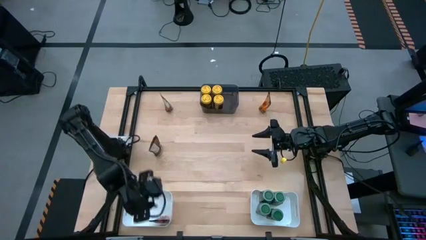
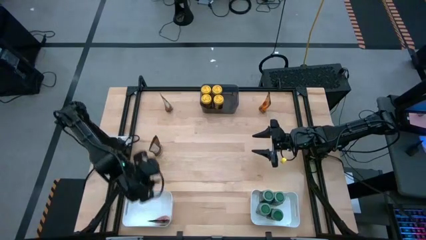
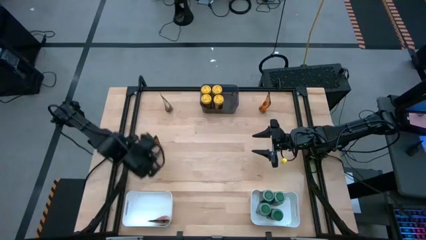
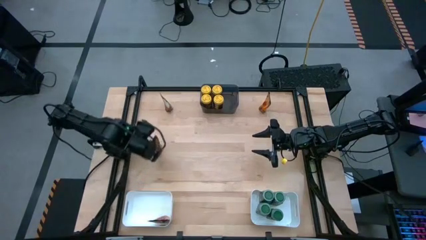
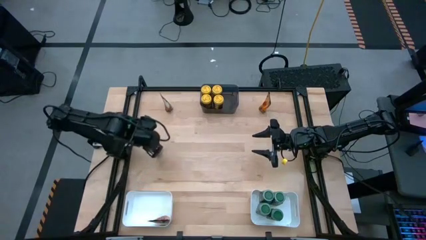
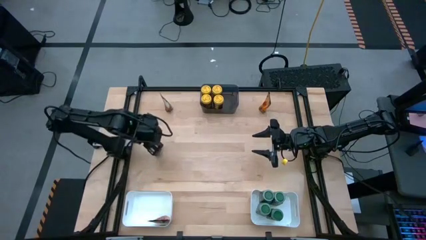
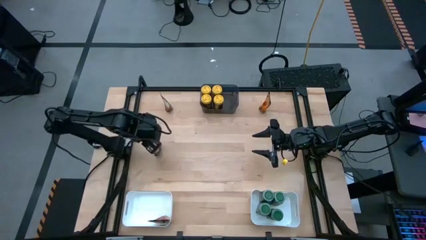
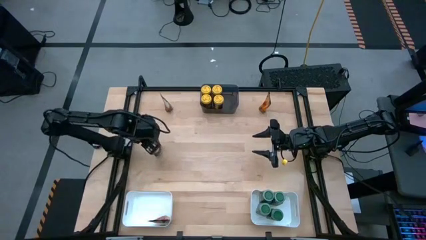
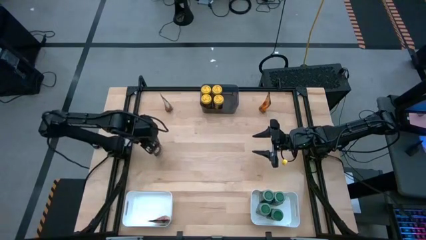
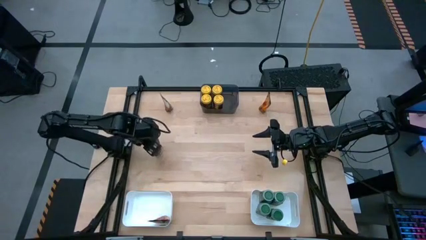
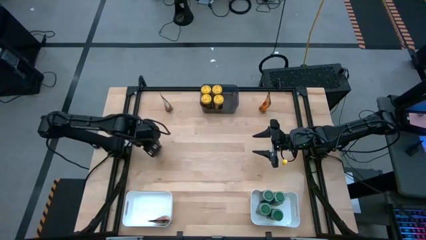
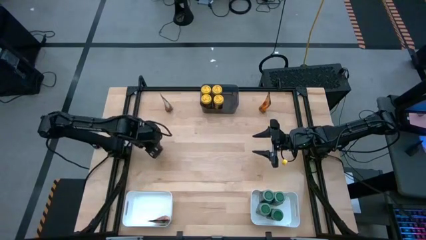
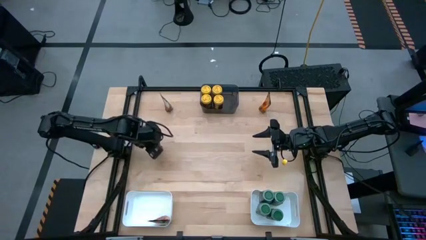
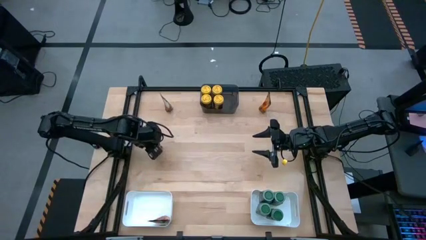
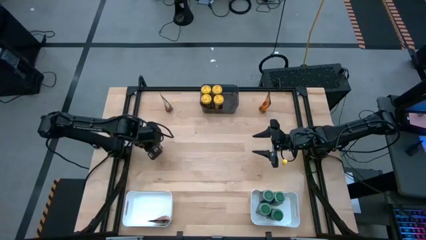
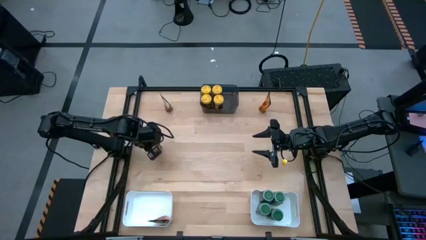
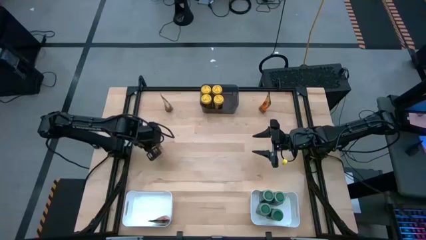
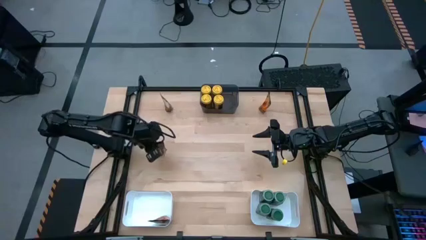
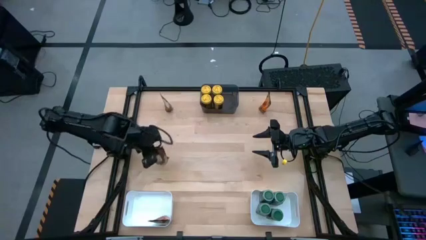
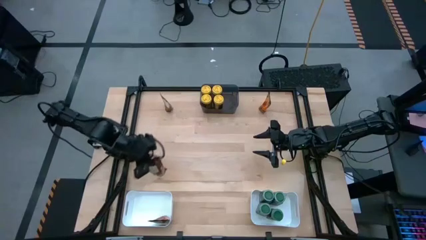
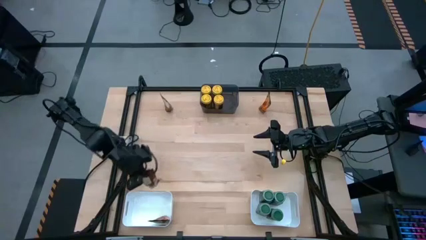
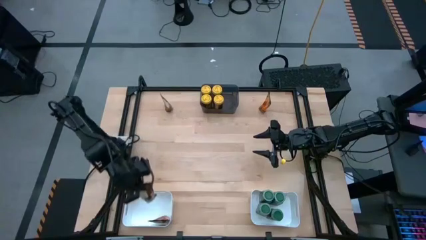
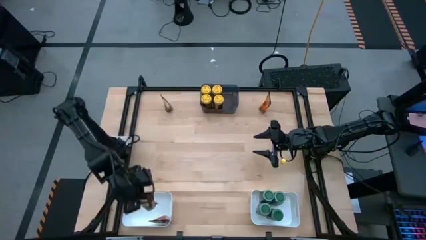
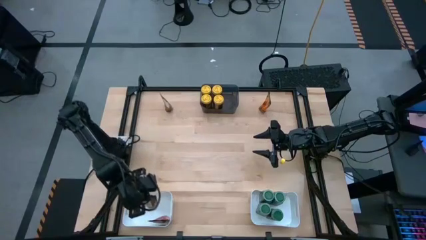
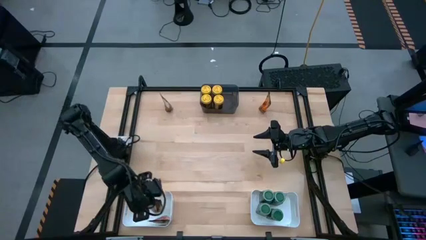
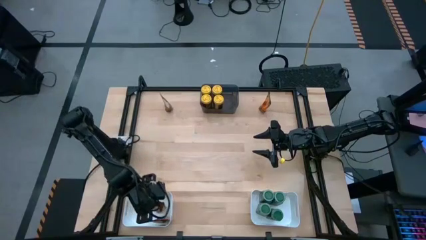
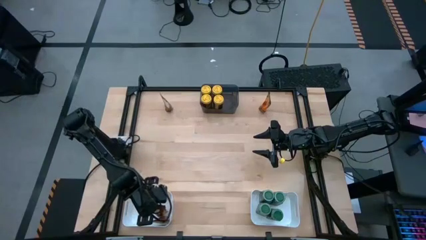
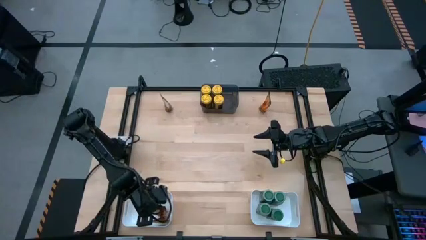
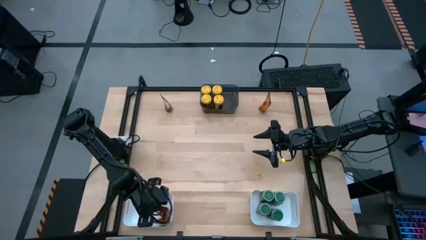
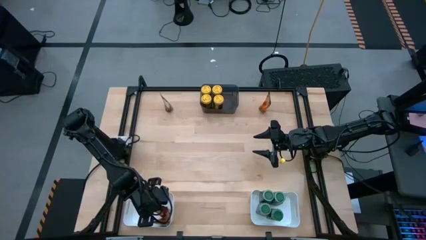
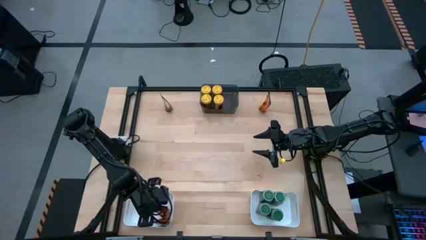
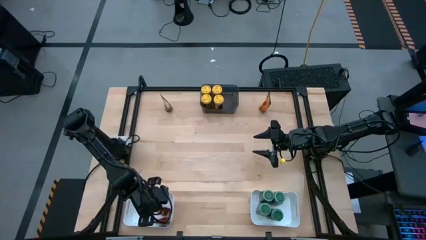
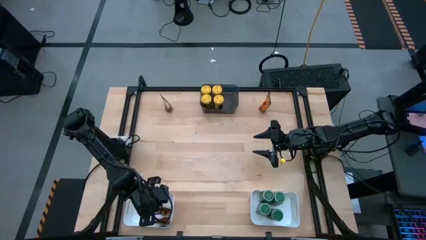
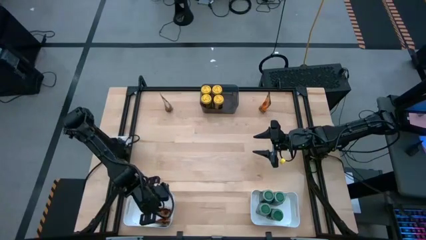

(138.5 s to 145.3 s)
Task: Sort spices by type
Put the bottom left orange seasoning pack into the left white bin

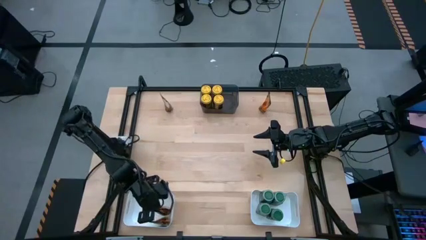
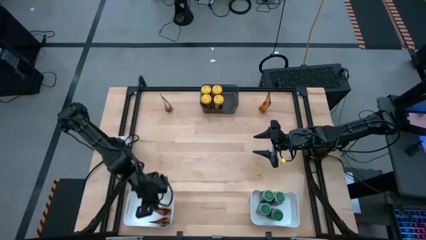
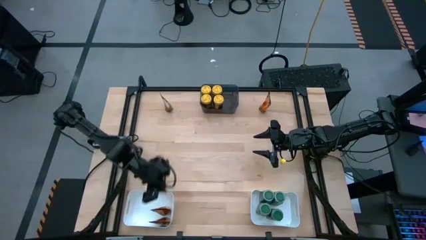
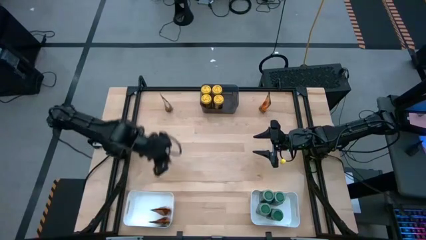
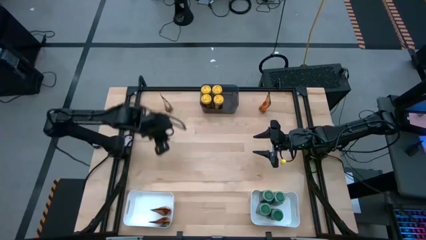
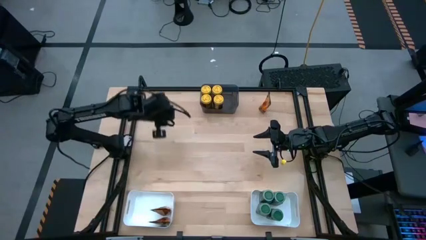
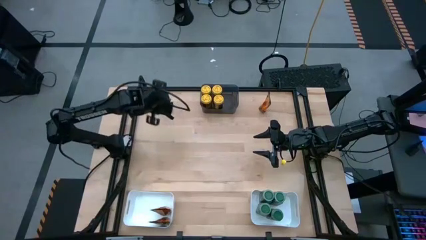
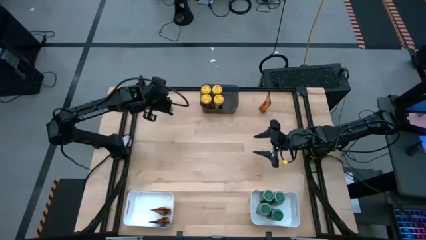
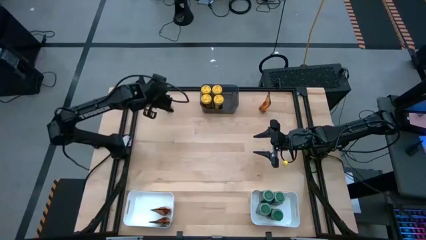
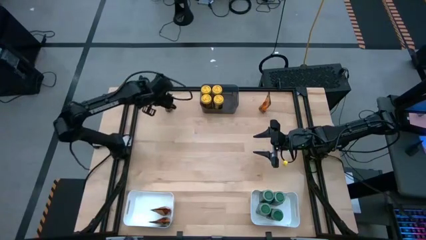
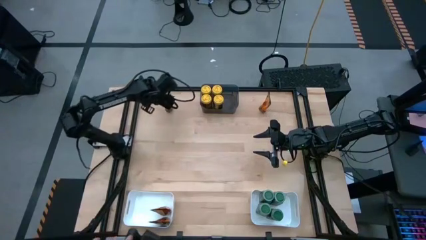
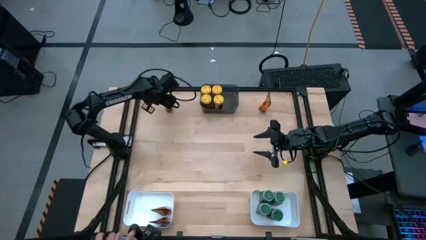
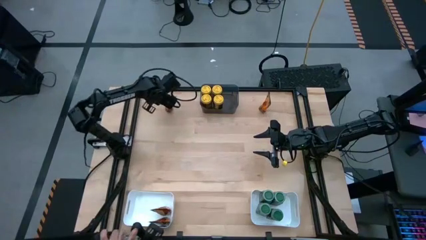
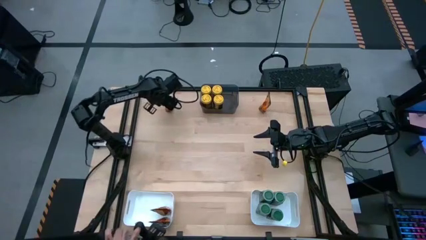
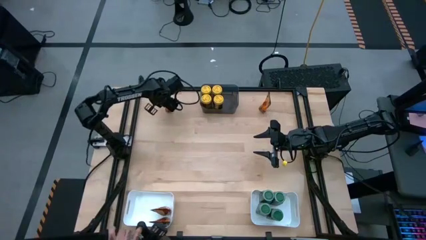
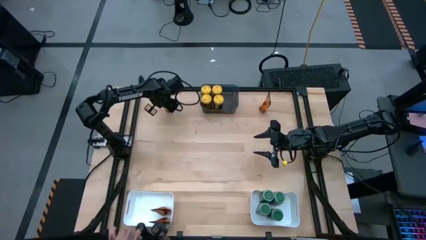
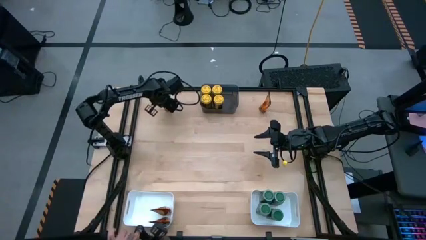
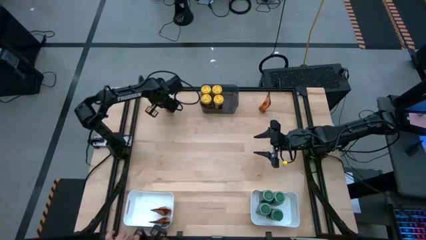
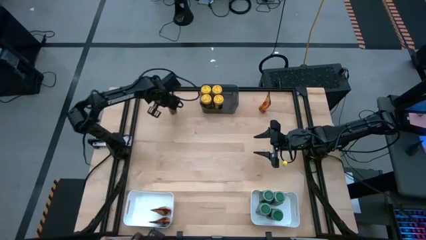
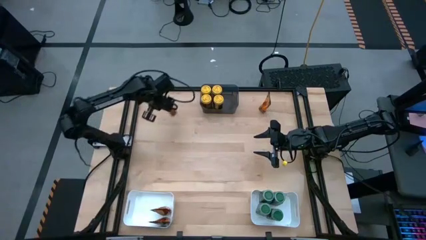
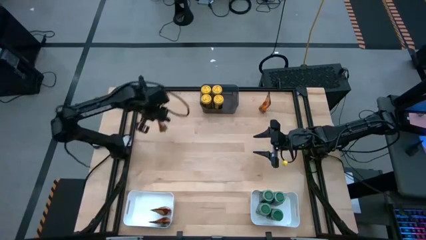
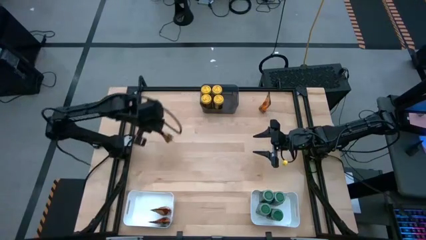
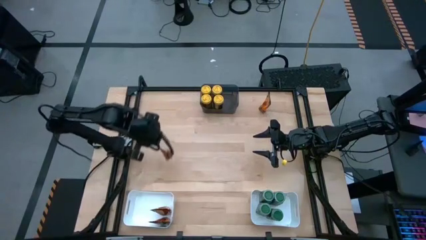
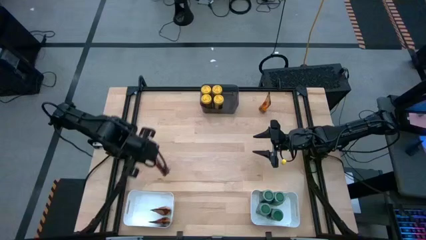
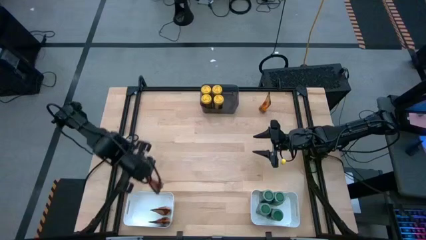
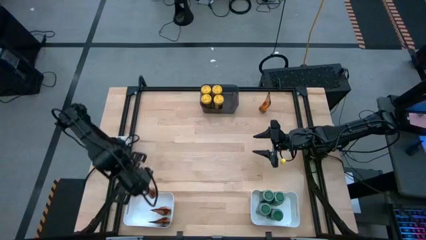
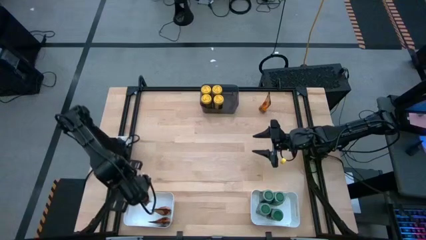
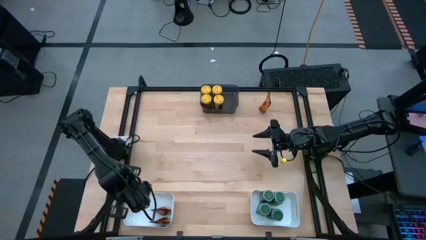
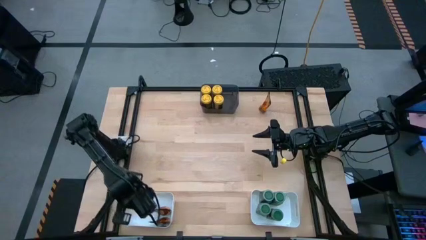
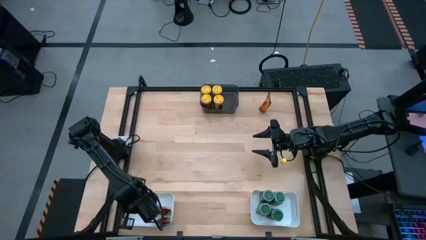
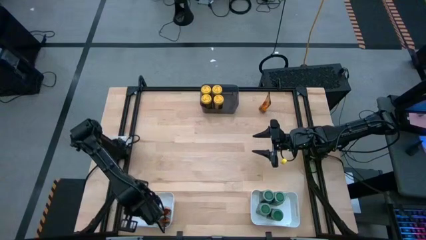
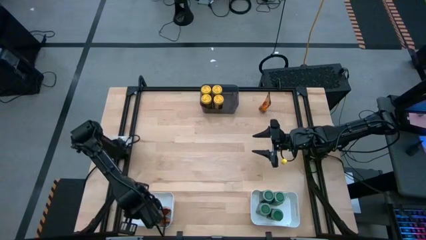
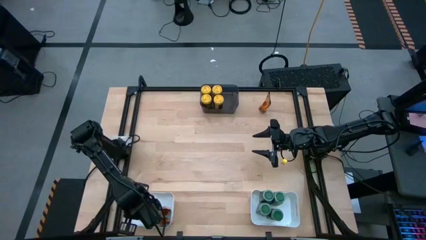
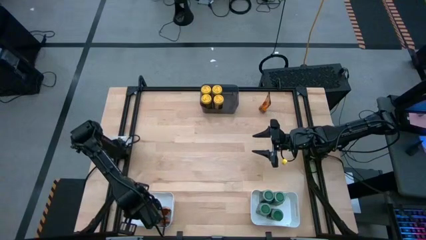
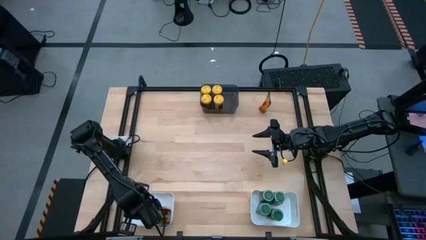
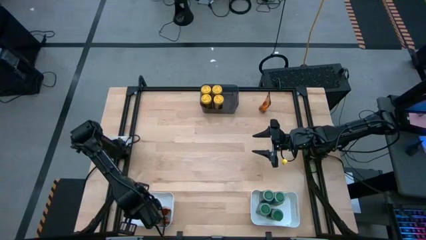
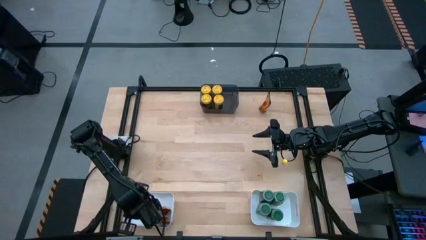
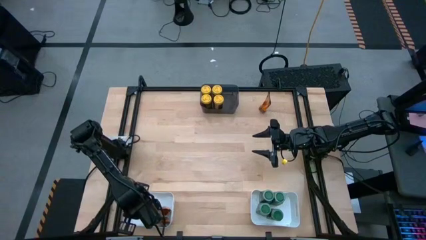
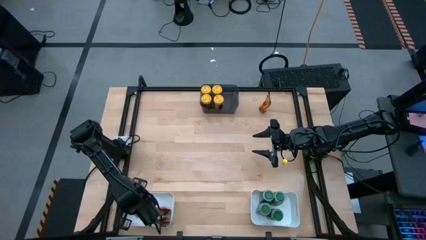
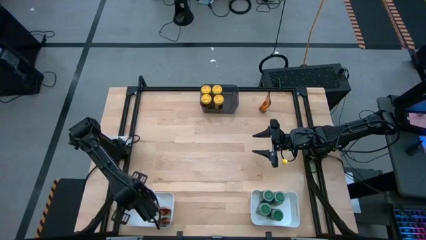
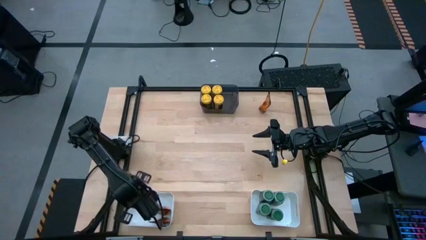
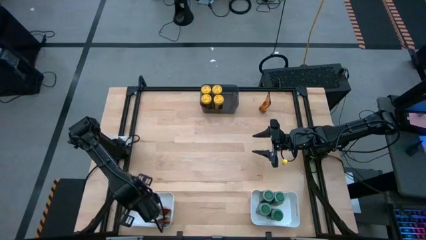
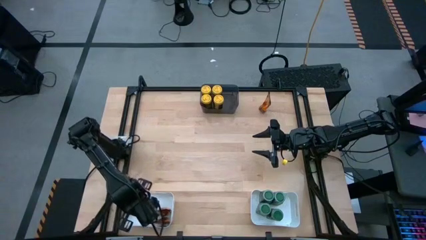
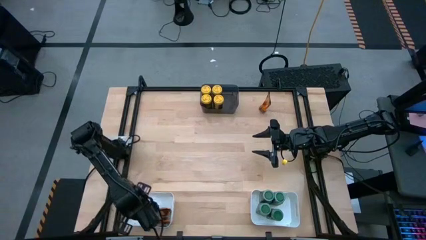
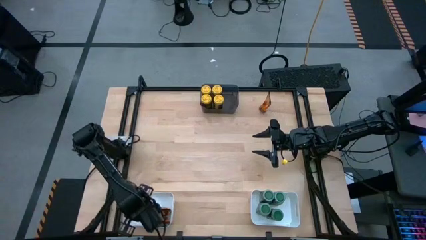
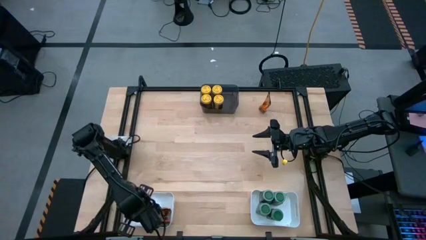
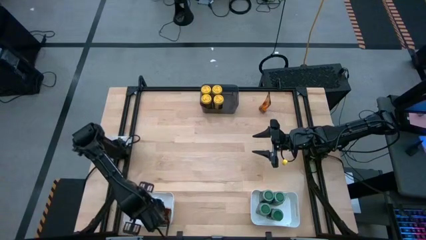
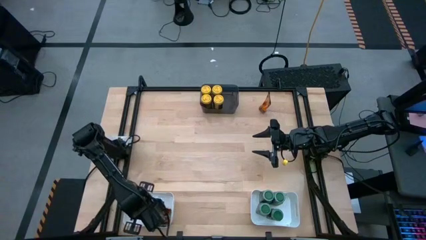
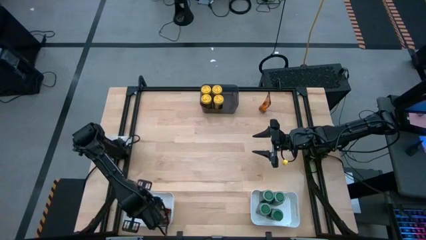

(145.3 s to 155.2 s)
Put the left orange seasoning pack into the left white bin

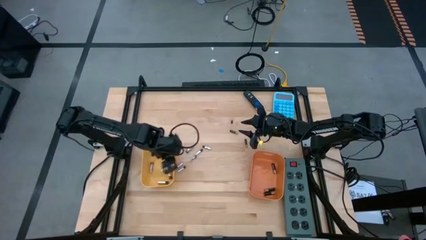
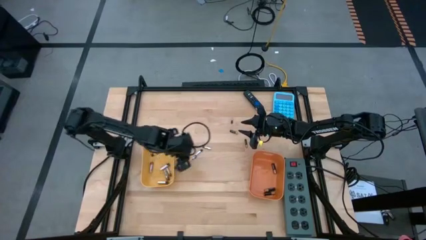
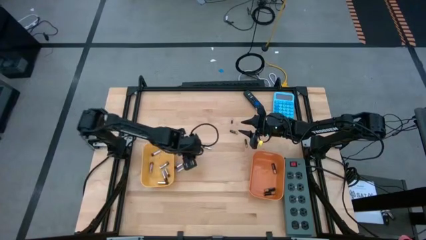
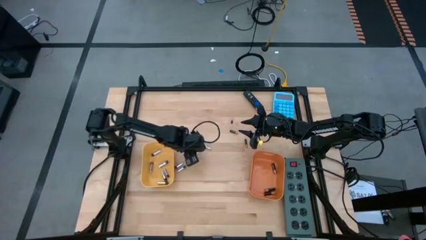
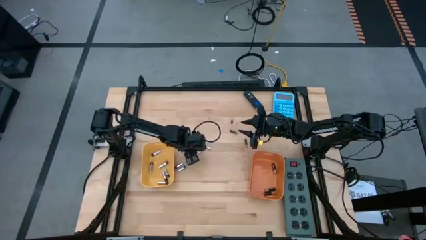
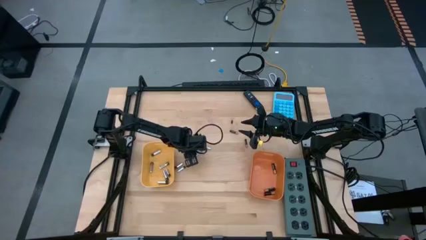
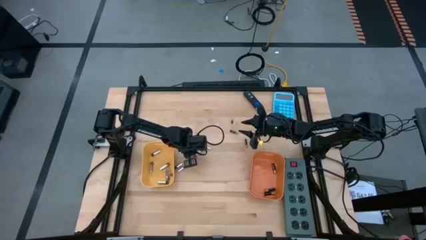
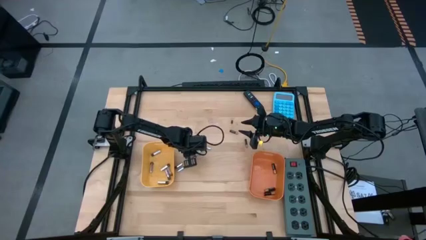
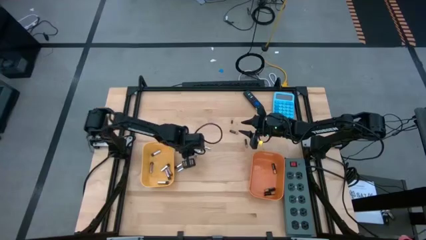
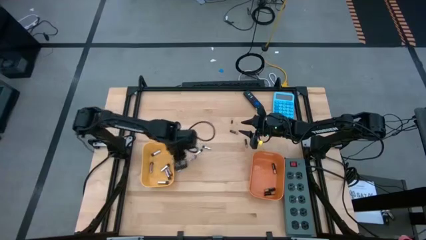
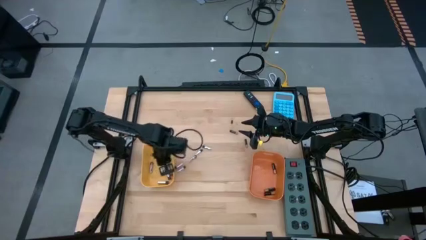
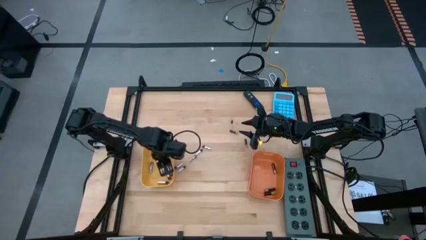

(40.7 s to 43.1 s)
Task: Sort batteries
Put the silver battery into the yellow bin
